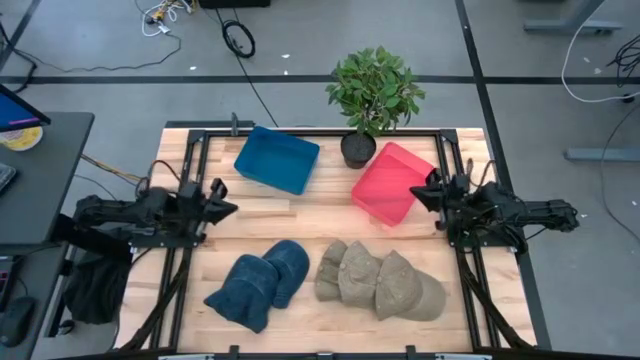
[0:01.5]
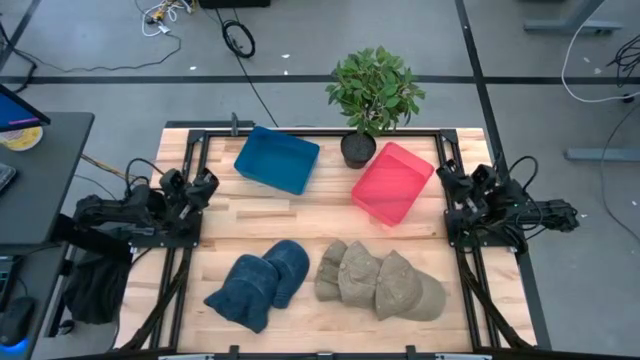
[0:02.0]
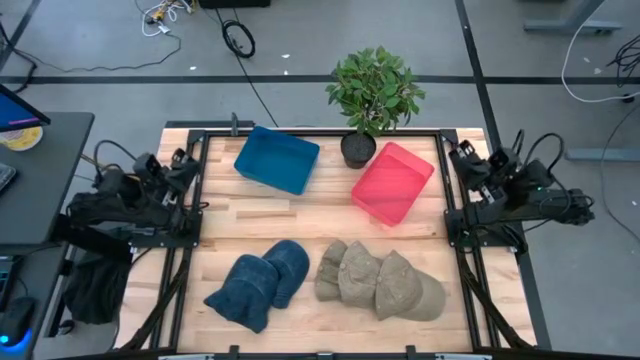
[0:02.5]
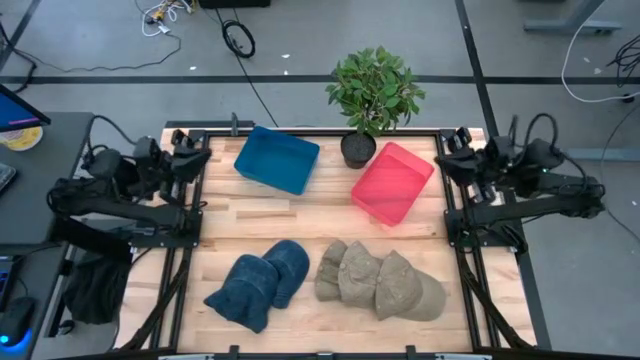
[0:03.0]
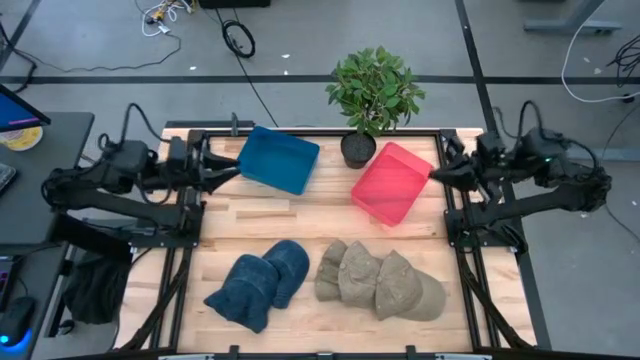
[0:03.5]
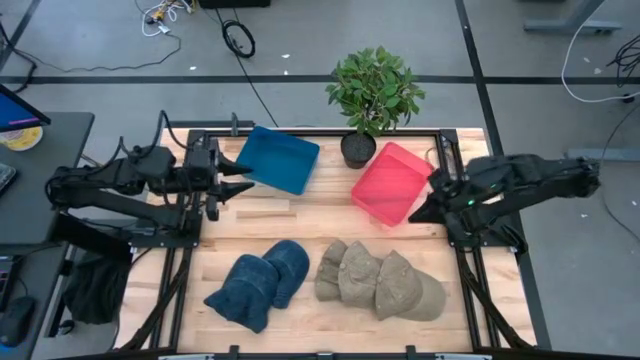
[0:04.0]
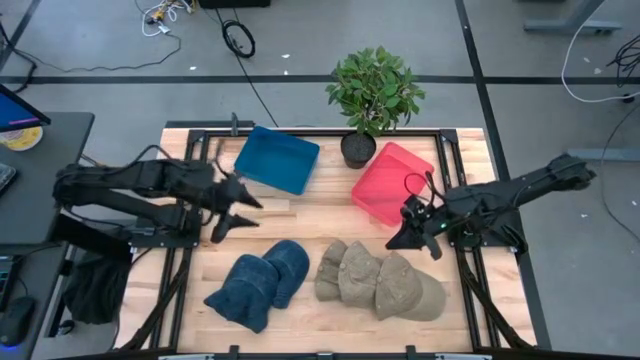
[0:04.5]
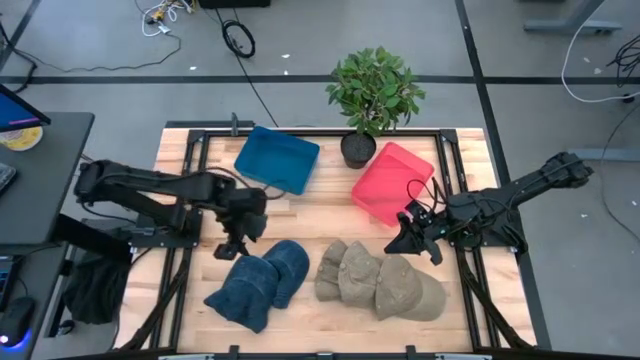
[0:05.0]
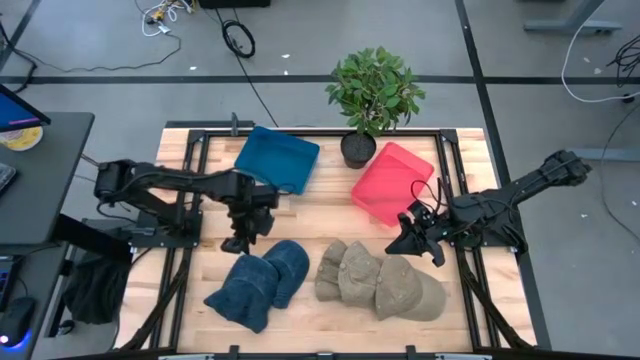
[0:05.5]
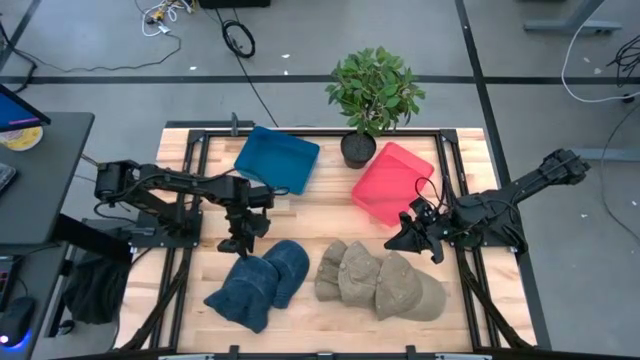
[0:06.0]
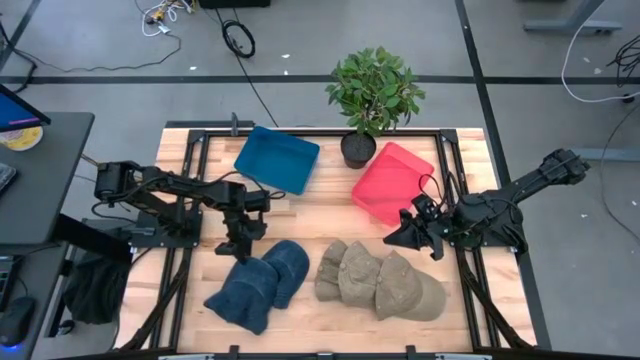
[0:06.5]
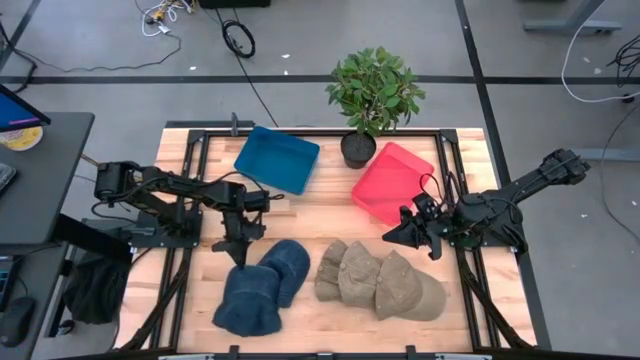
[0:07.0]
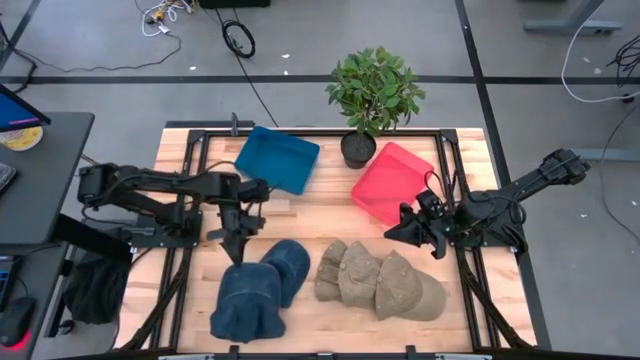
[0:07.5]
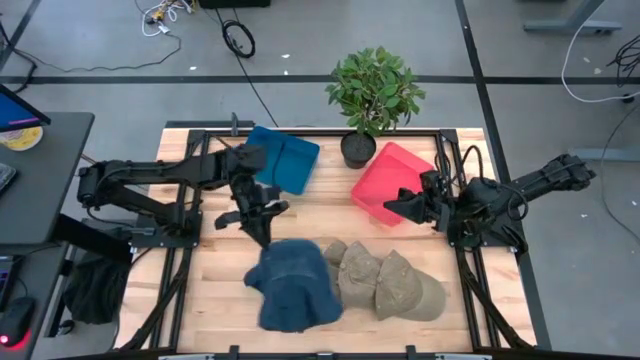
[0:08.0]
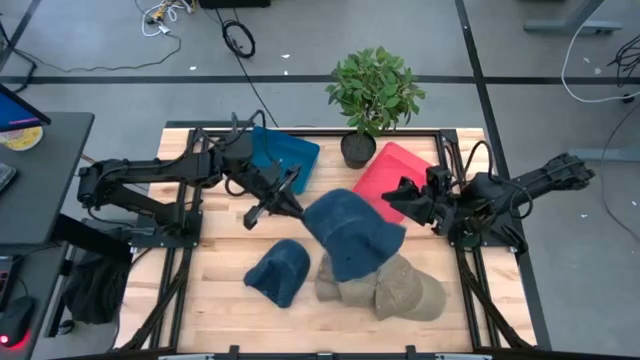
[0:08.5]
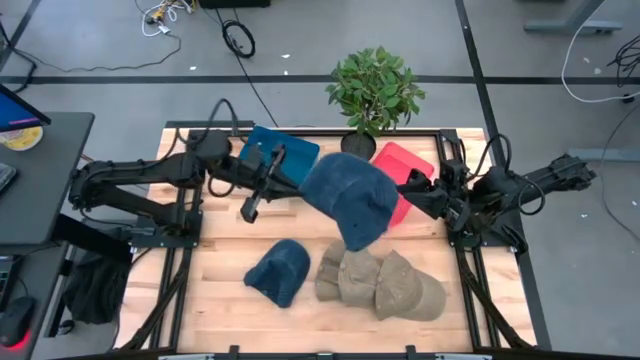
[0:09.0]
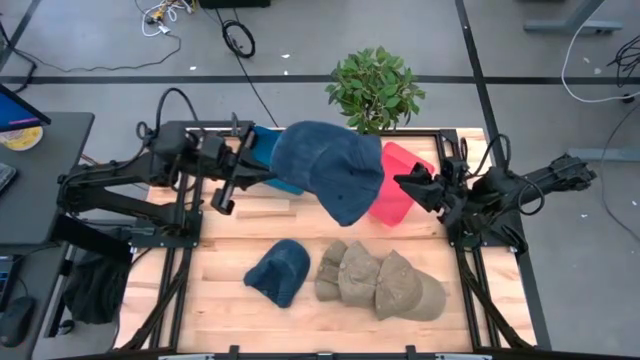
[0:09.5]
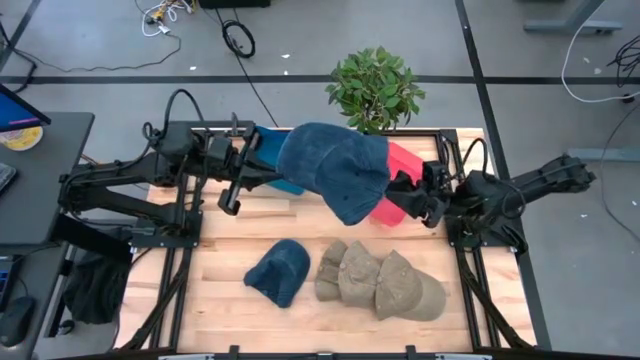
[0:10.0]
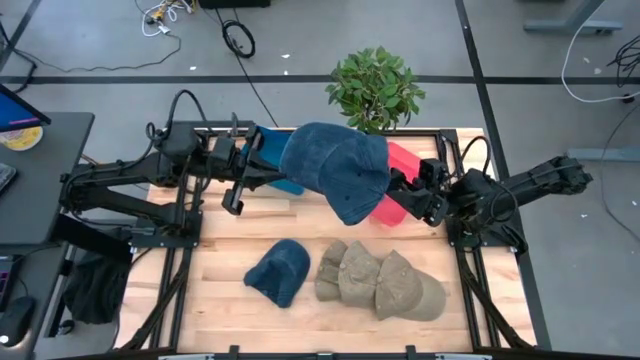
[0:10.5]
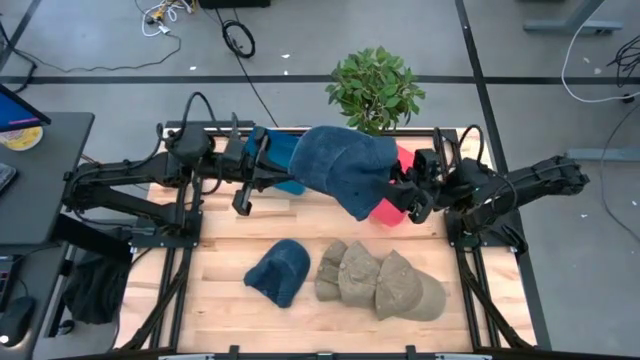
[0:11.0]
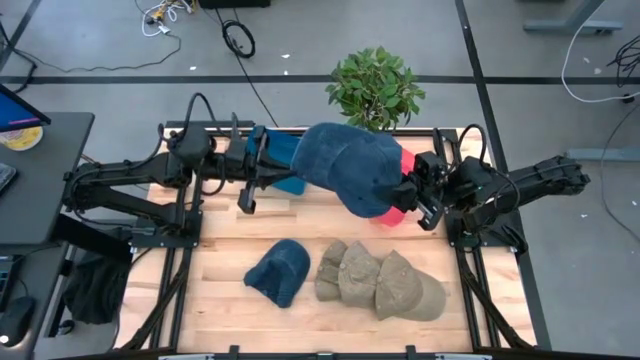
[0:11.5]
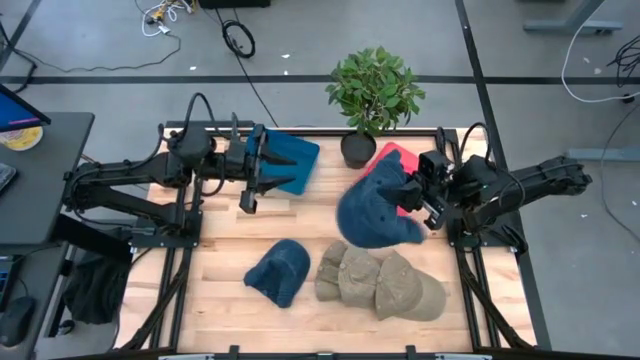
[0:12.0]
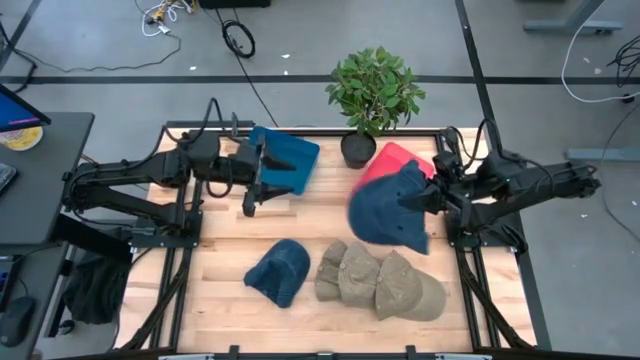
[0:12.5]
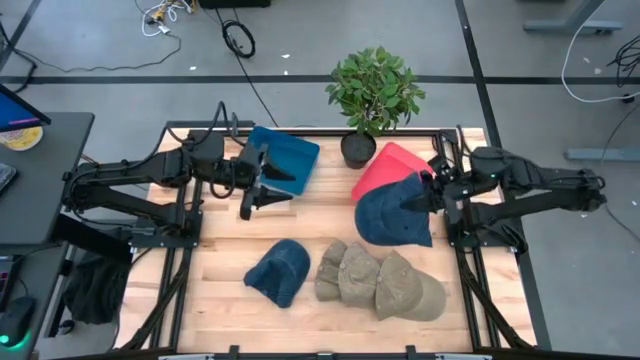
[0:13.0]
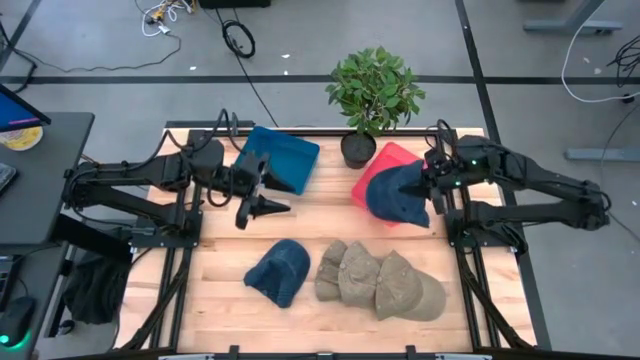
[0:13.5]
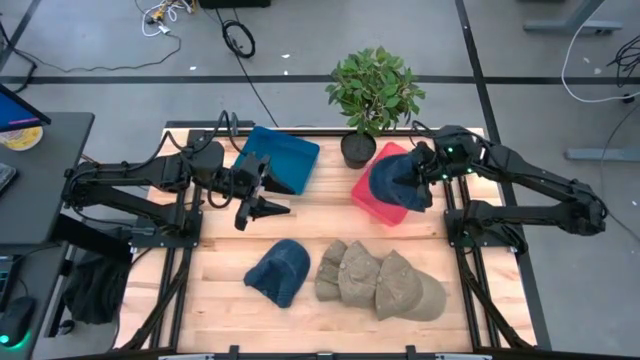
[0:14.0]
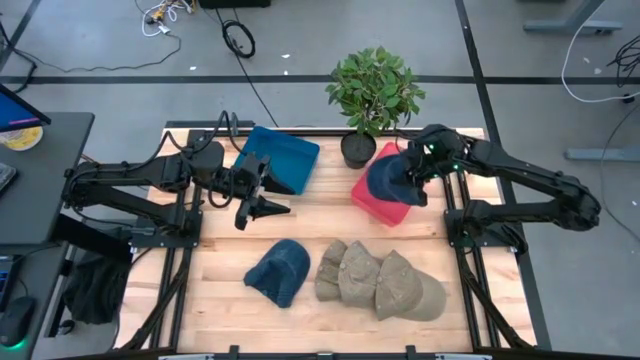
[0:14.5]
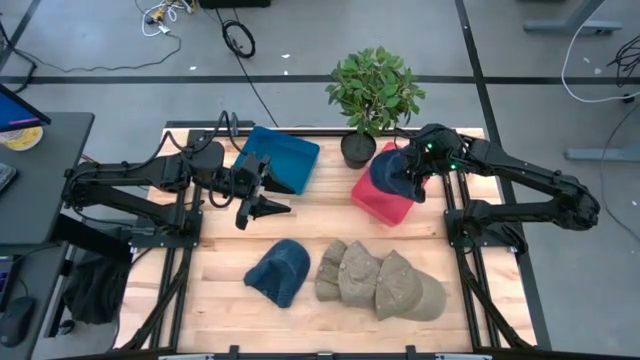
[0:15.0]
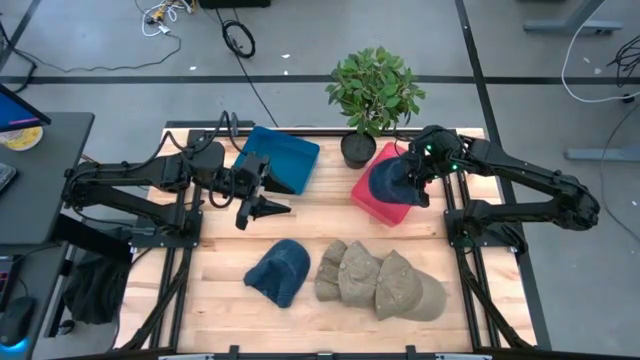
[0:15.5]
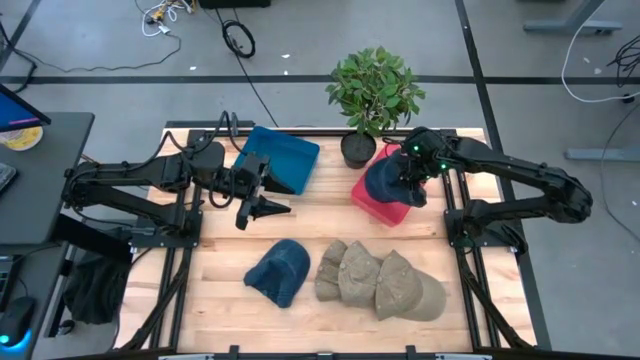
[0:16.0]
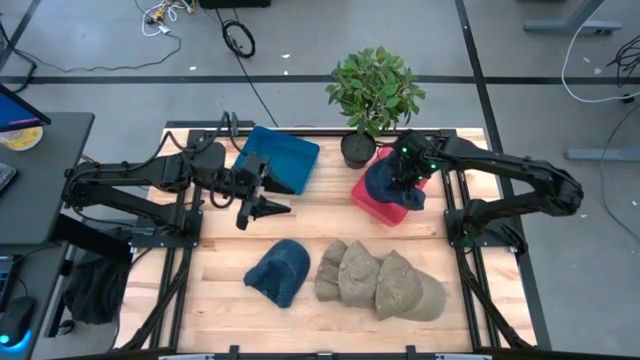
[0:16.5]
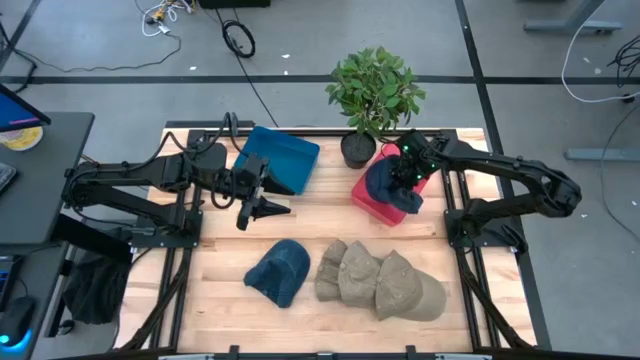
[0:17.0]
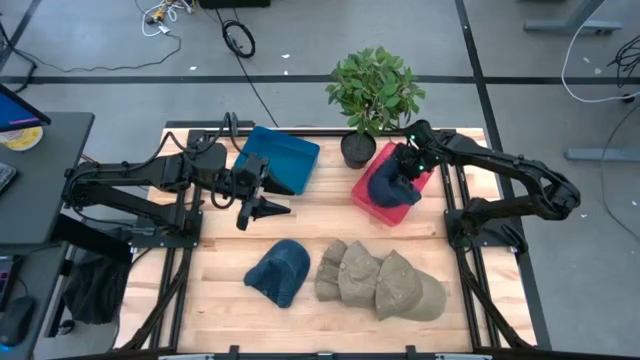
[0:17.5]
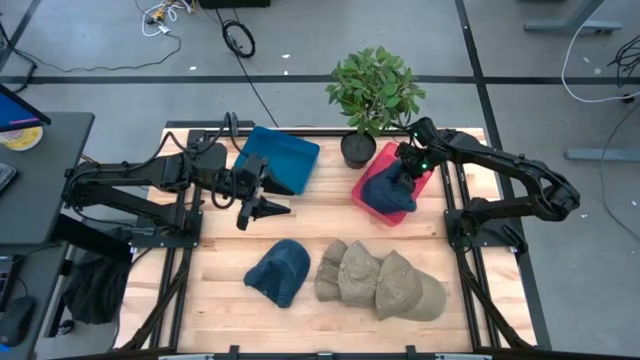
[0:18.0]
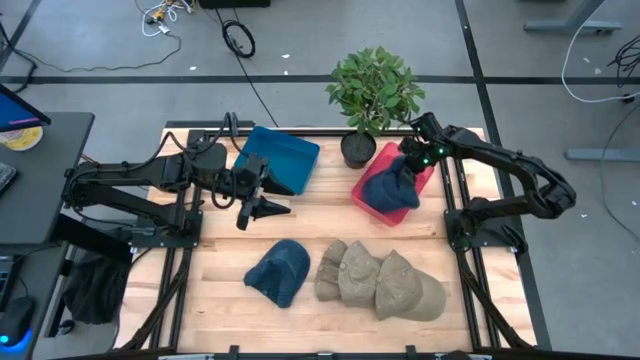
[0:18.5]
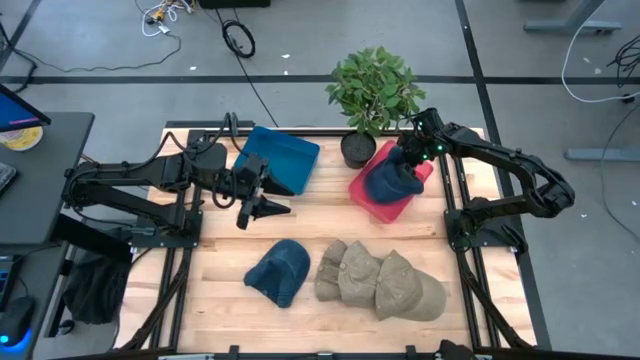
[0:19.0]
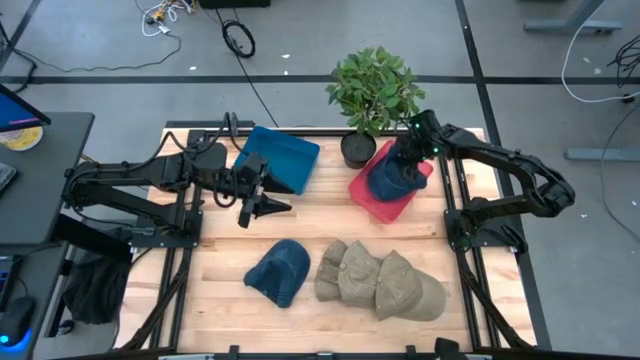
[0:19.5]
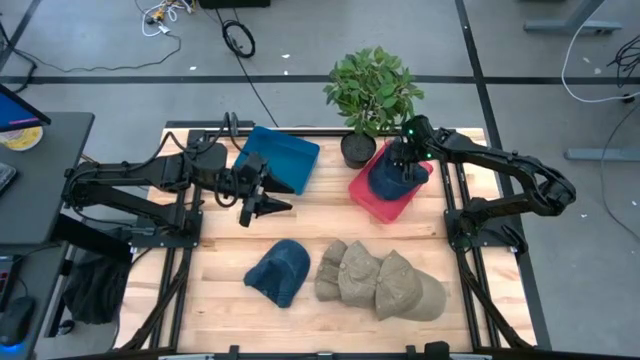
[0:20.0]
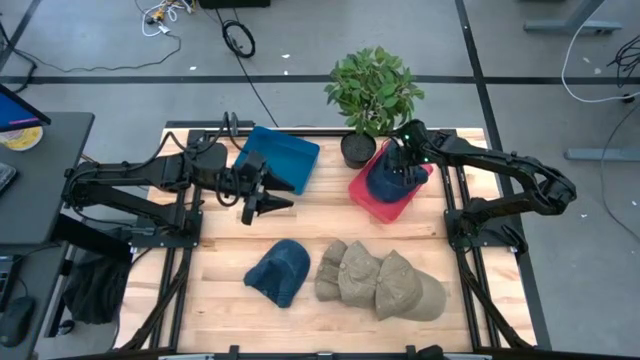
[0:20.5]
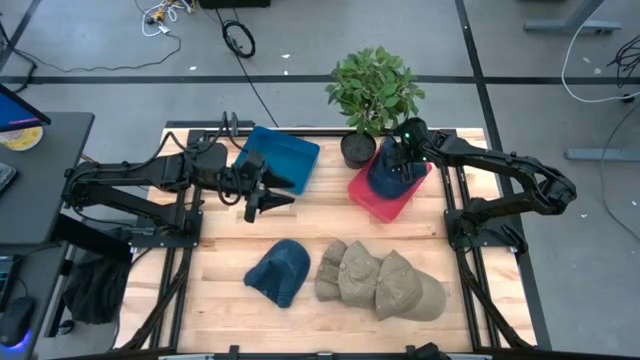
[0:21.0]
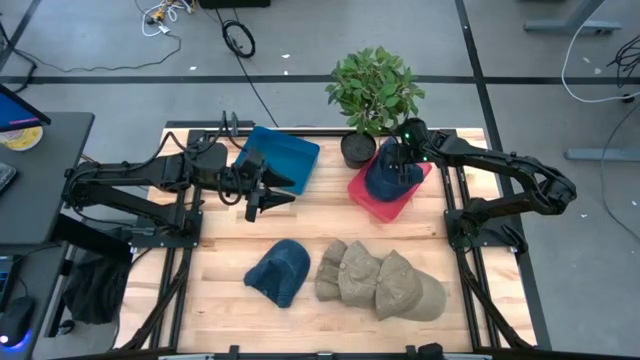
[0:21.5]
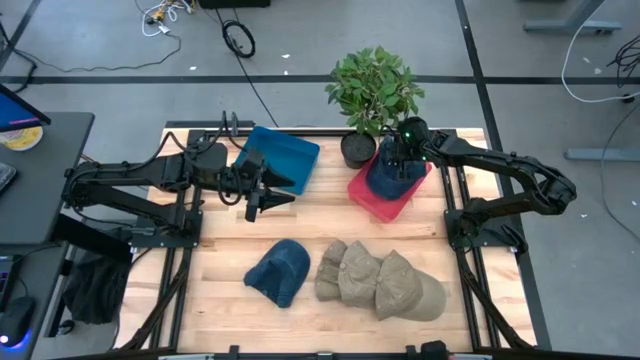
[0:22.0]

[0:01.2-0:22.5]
Task: Pick & Place hat
Put the bottom blue cap into the red bin
